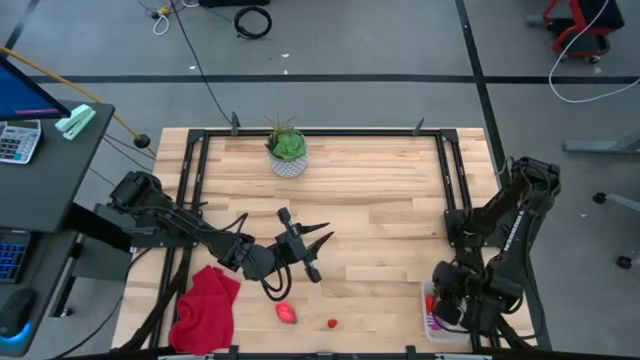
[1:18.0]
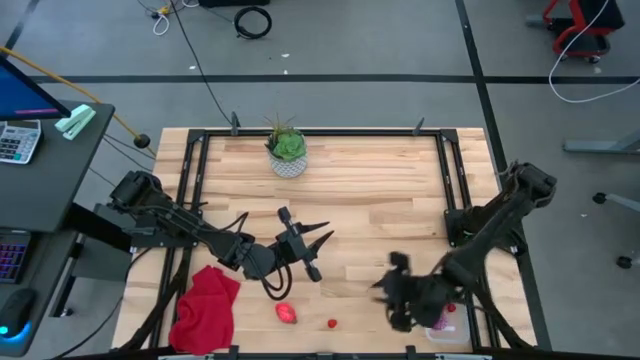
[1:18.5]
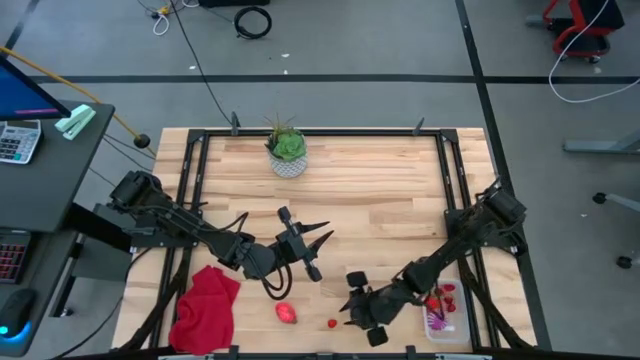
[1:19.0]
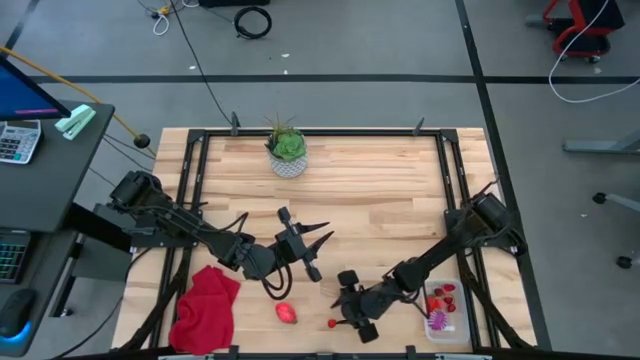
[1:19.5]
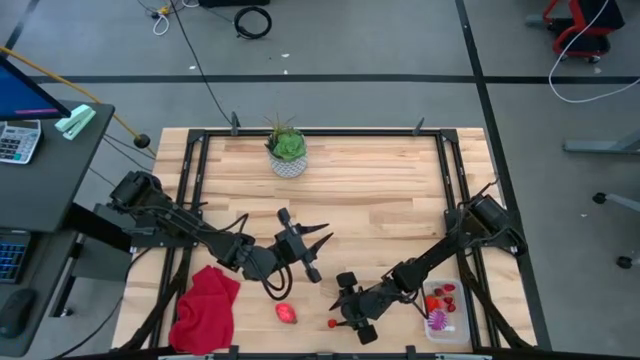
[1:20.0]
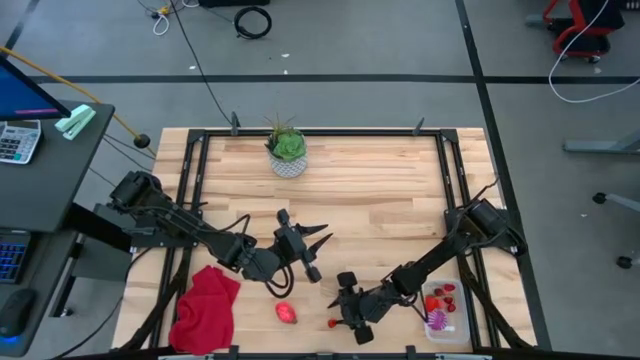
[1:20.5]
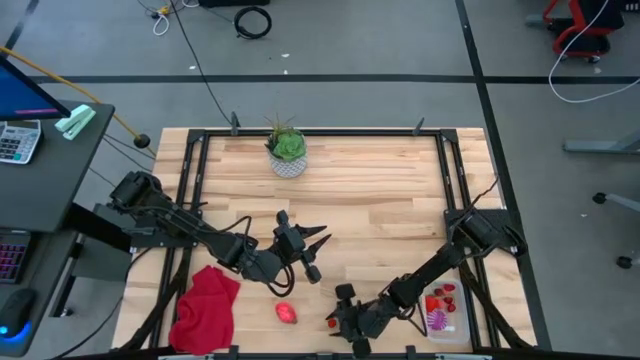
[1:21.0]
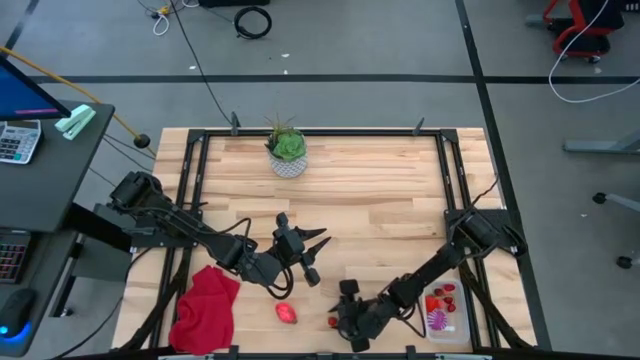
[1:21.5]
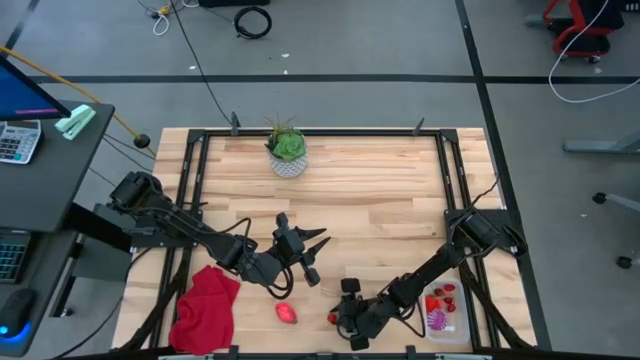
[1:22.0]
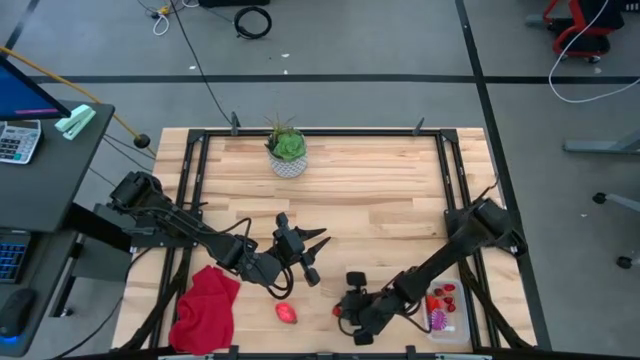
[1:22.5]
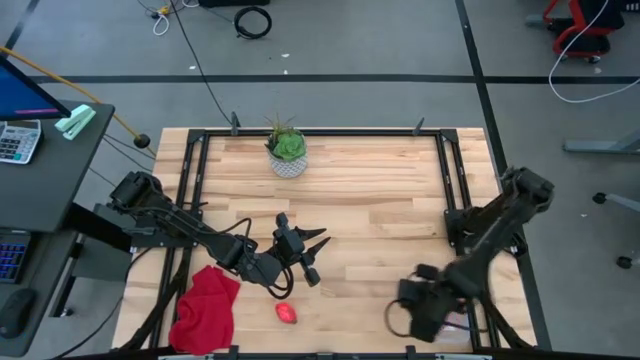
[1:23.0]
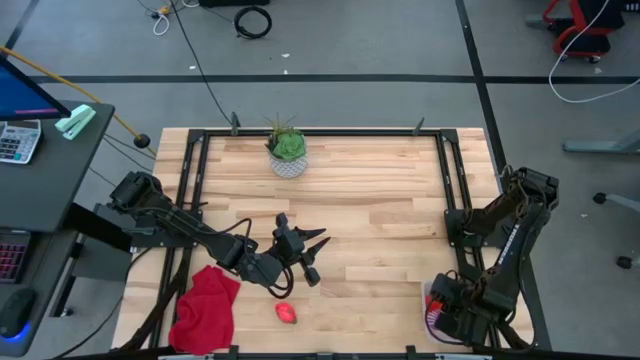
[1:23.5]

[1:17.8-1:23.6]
Task: Pick and placing Produce into tupperware
Put the red raspberry into the transparent container

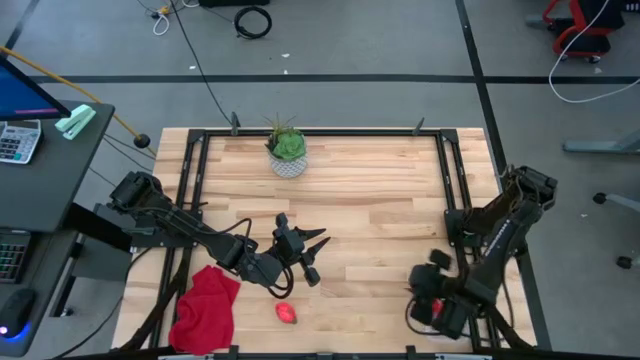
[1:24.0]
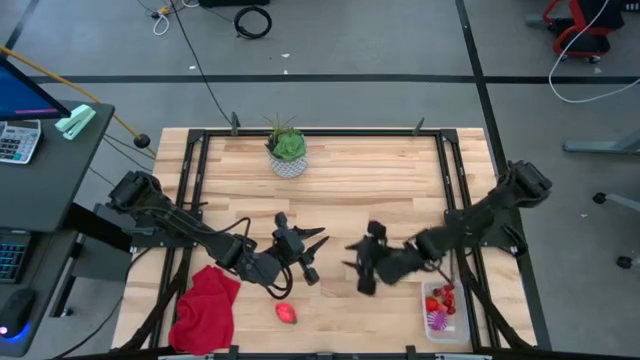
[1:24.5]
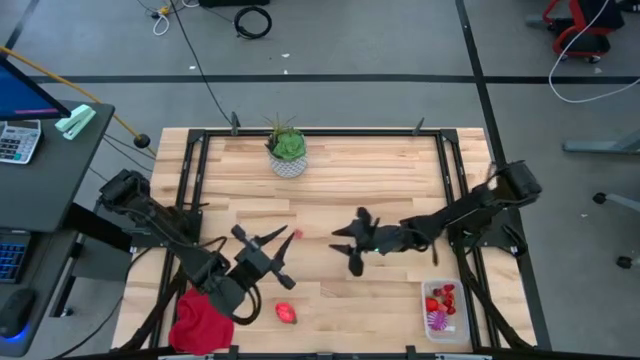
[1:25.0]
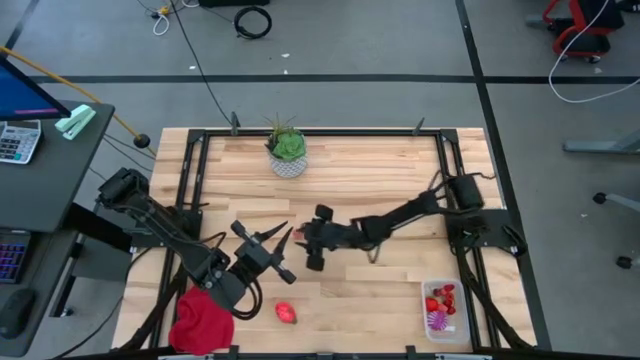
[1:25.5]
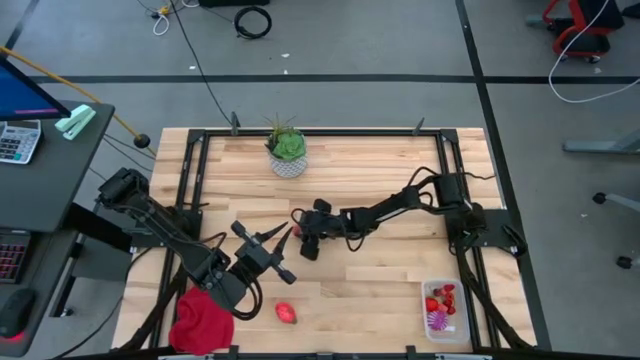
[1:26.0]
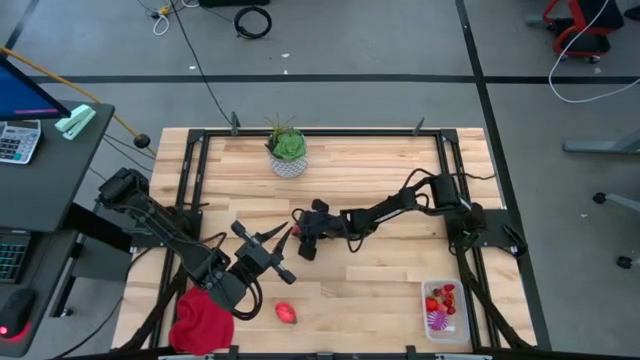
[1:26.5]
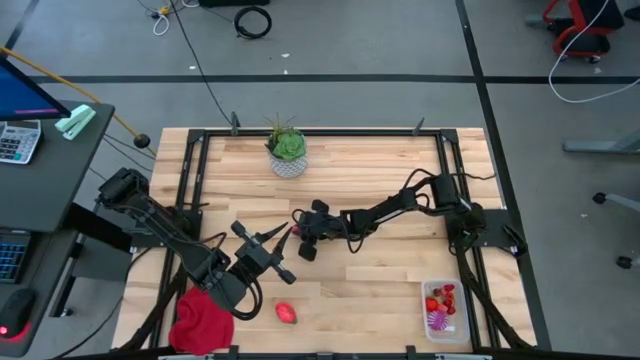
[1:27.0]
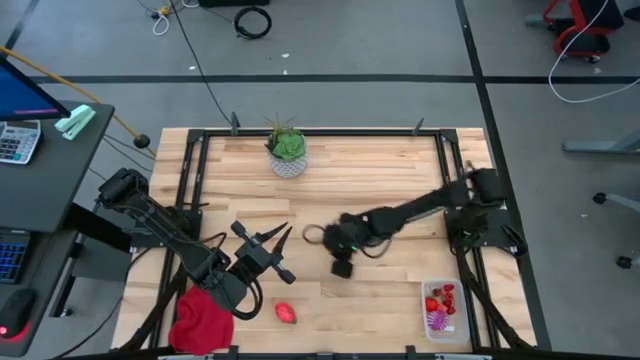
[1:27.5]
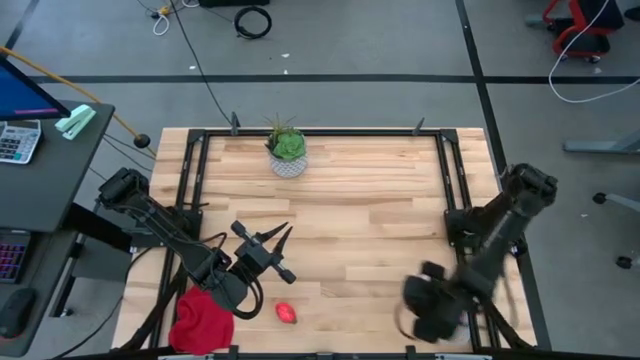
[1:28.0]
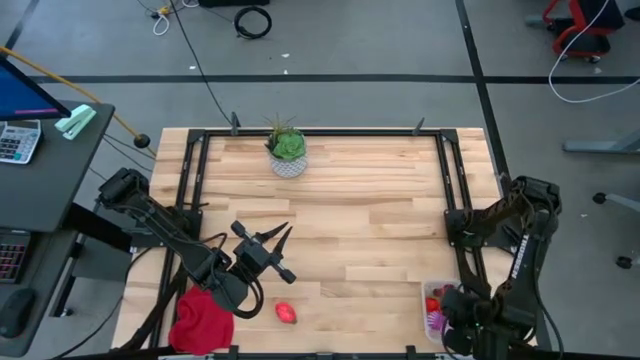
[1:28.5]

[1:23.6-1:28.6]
Put the pink peach into the transparent container

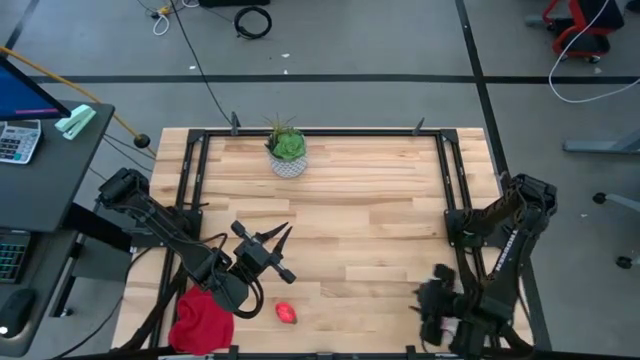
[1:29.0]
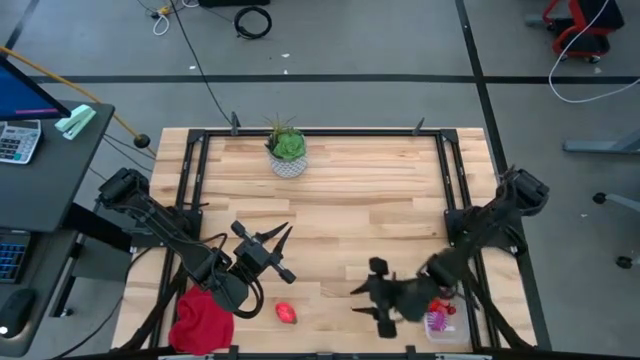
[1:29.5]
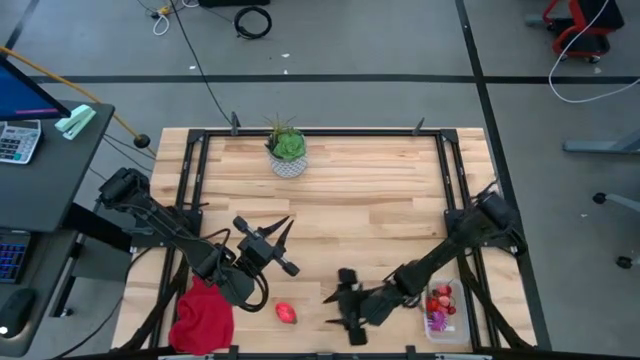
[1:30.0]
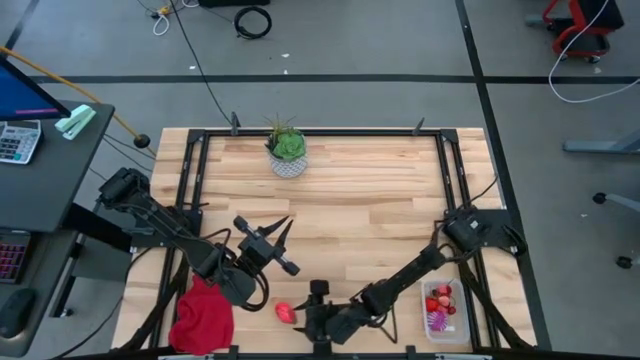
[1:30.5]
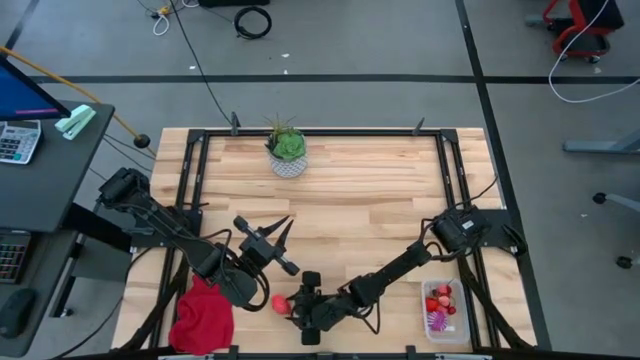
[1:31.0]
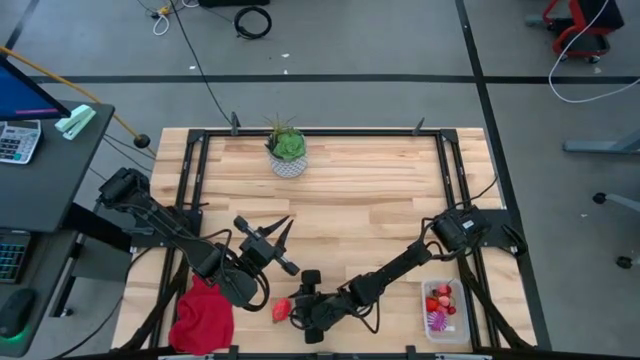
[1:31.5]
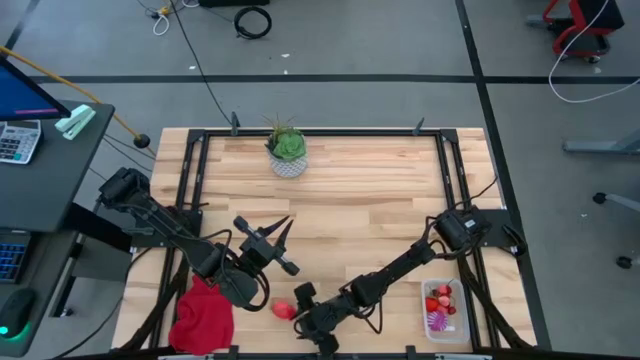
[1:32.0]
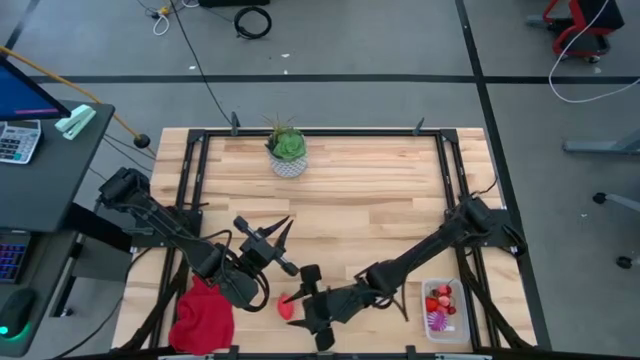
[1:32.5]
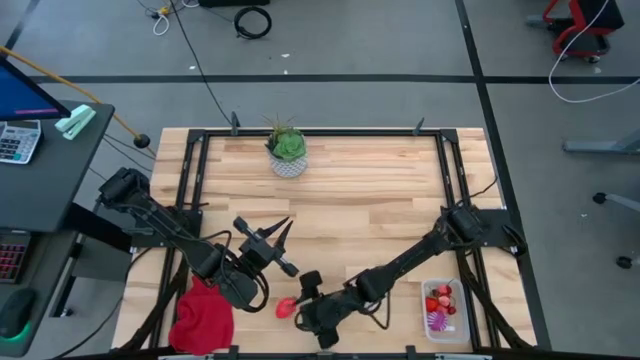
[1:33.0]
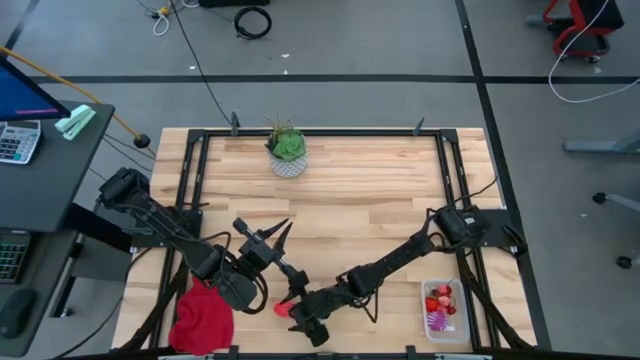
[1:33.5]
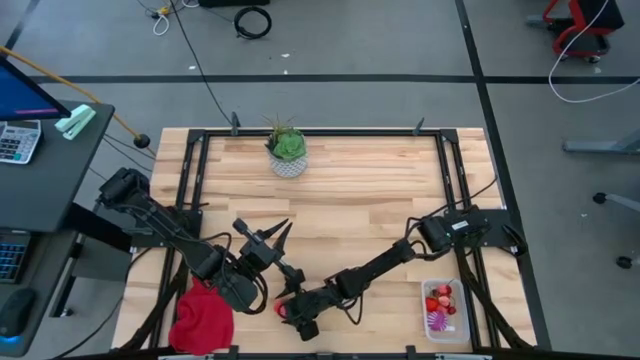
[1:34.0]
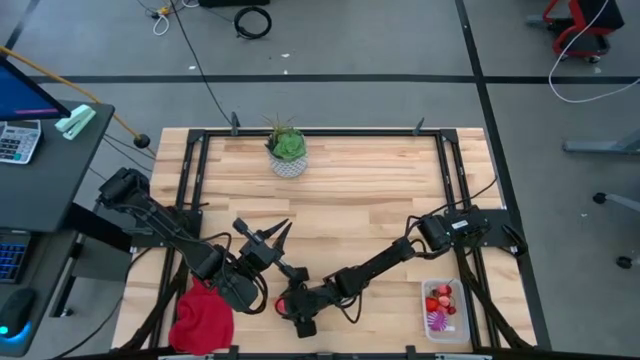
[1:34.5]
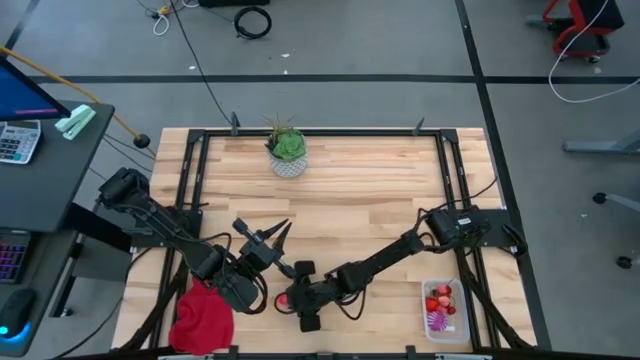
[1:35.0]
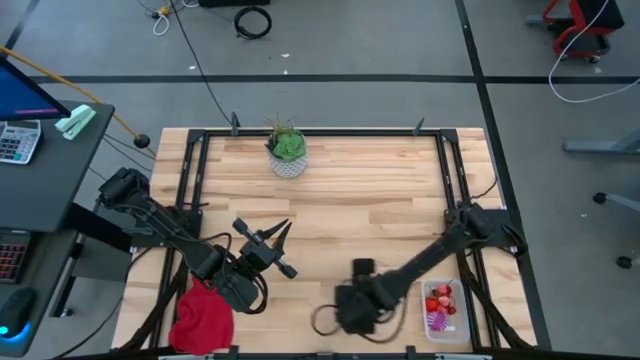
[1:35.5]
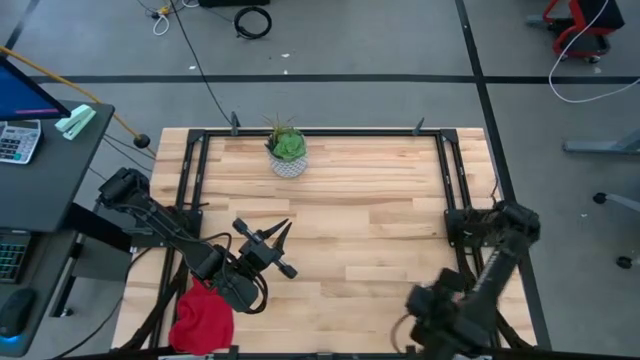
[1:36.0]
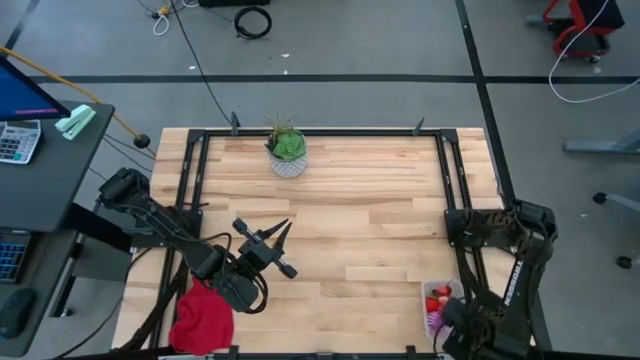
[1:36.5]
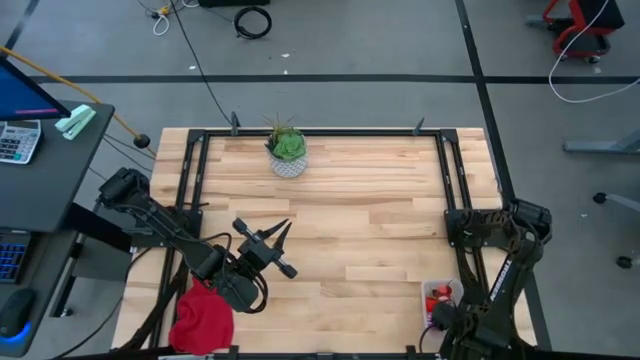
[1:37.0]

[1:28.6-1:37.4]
Put the pink dragon fruit into the transparent container

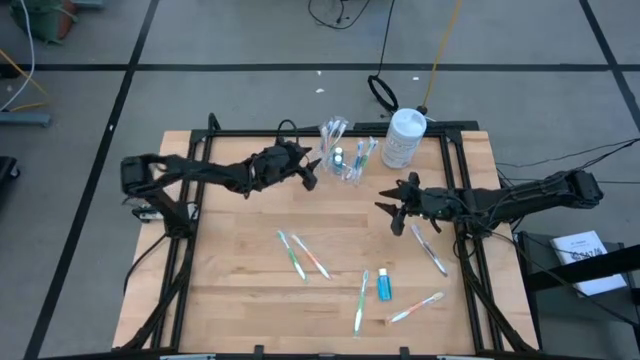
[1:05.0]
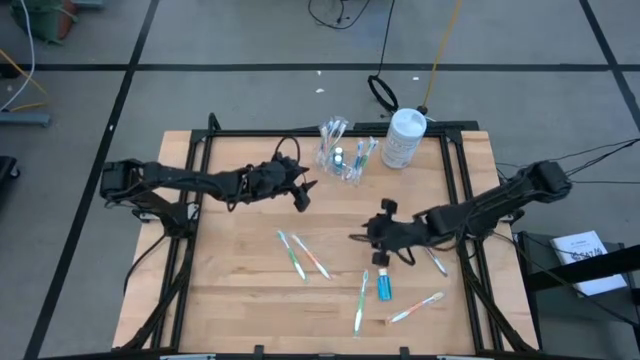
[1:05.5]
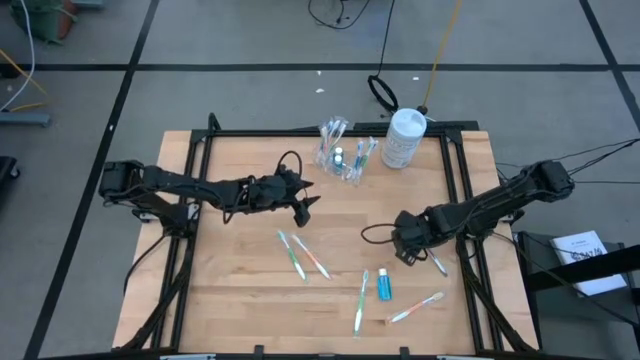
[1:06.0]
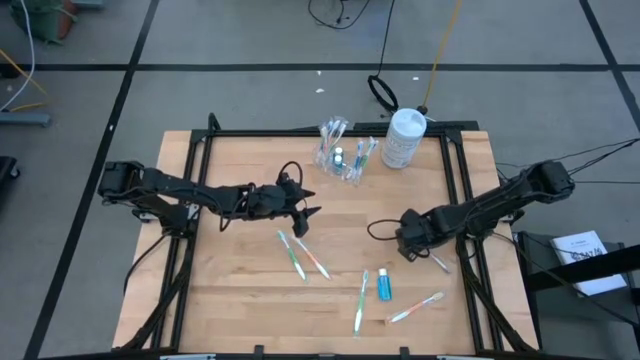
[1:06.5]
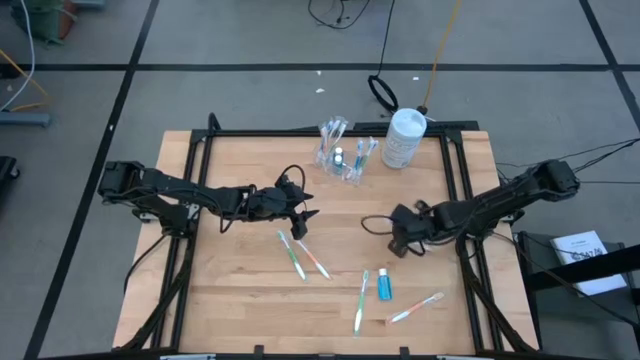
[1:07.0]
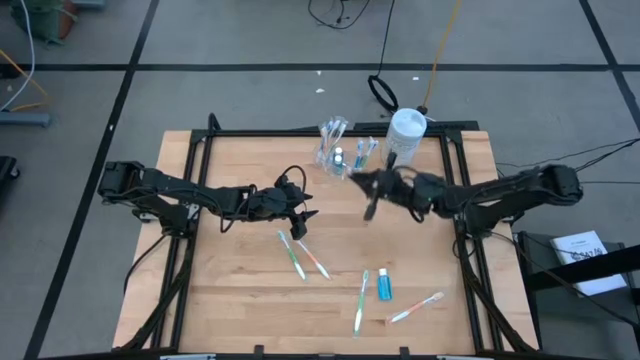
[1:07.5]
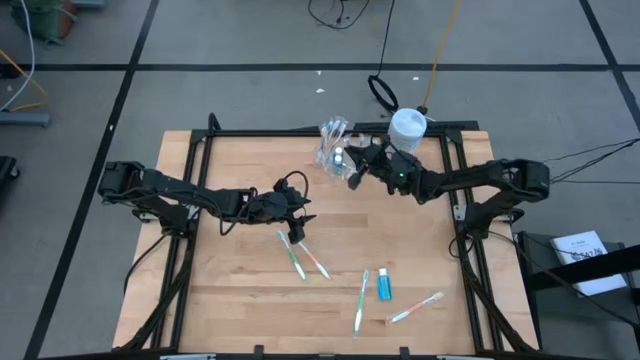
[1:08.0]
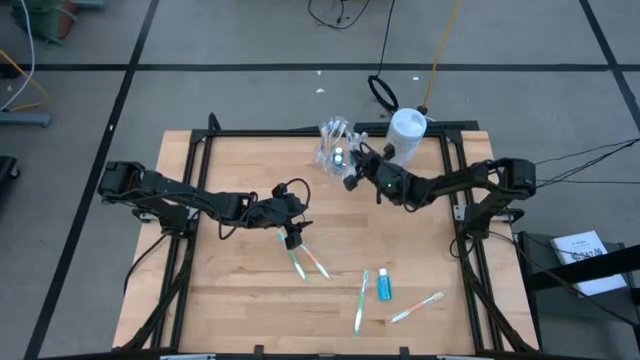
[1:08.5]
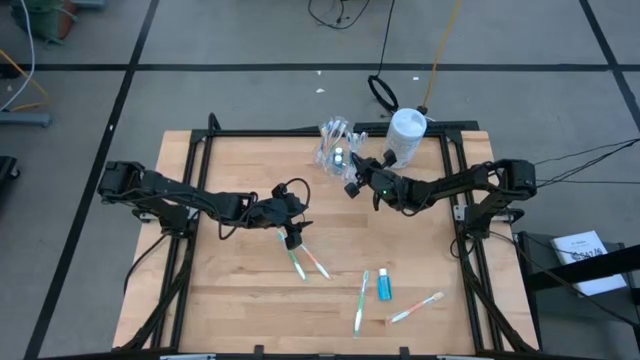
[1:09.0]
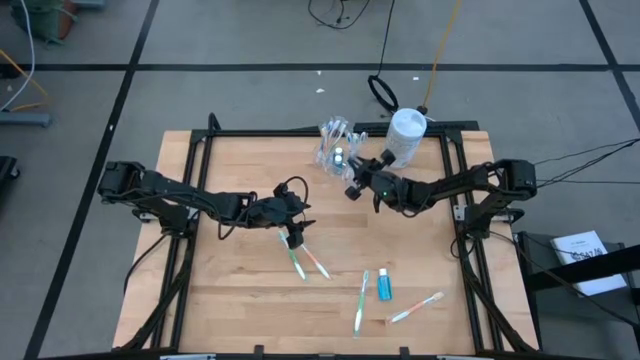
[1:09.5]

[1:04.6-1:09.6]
Task: Pick & Place toothbrushing station
Put the purple toothbrush into the transparent organizer
